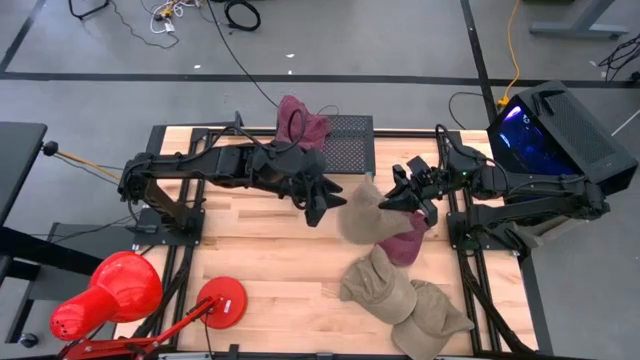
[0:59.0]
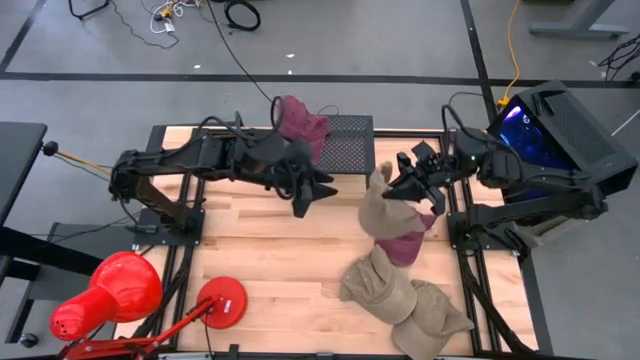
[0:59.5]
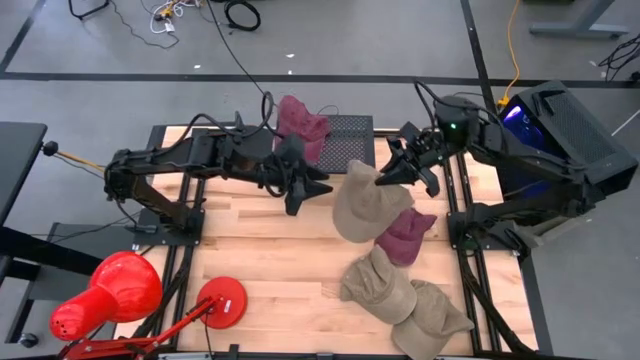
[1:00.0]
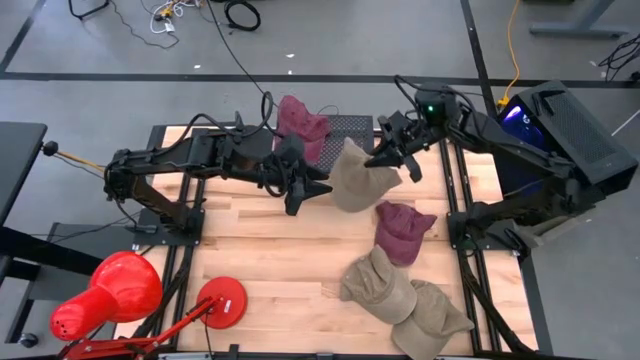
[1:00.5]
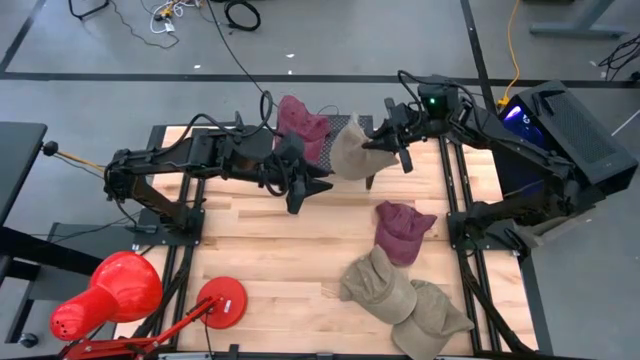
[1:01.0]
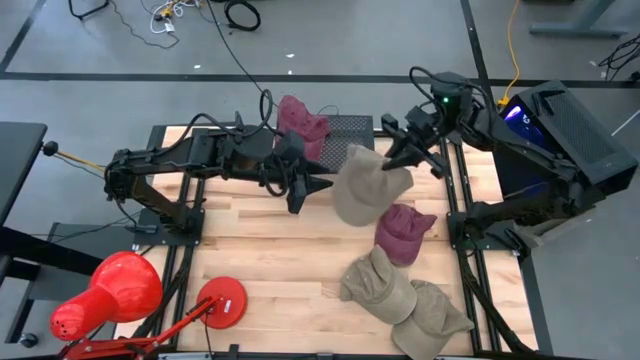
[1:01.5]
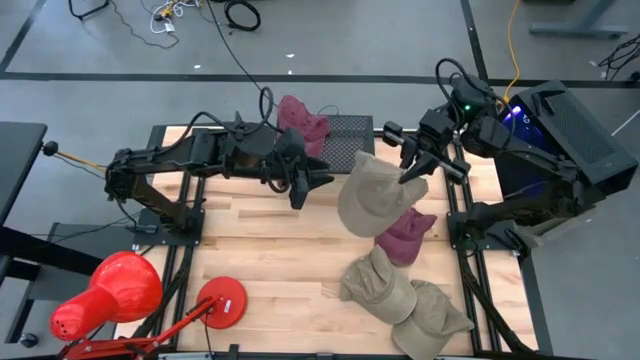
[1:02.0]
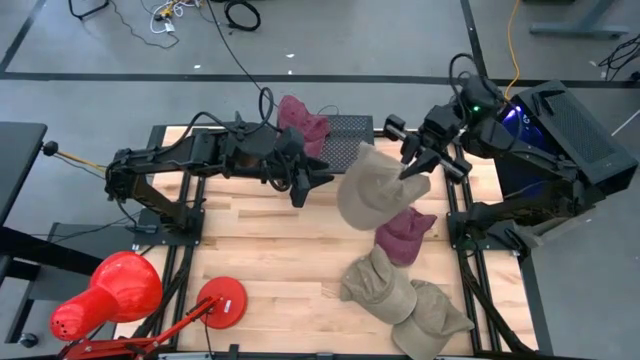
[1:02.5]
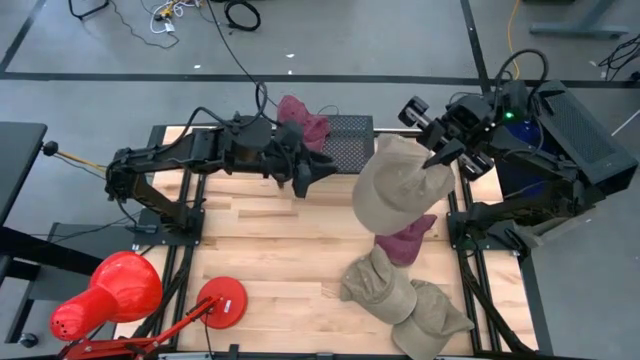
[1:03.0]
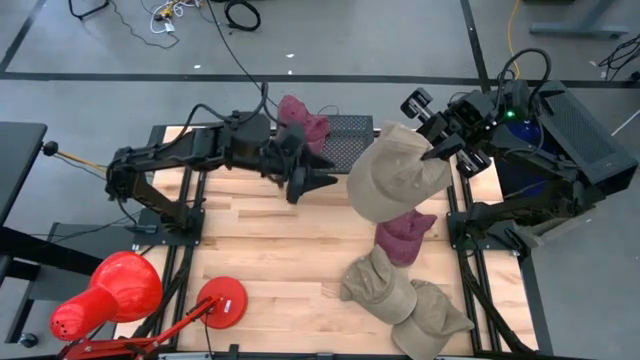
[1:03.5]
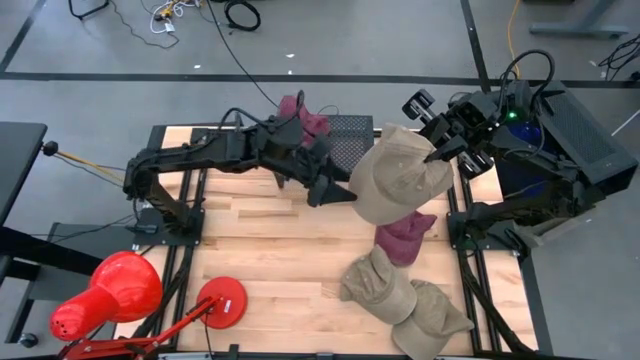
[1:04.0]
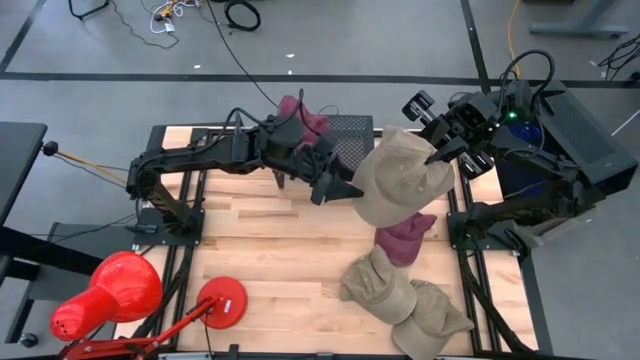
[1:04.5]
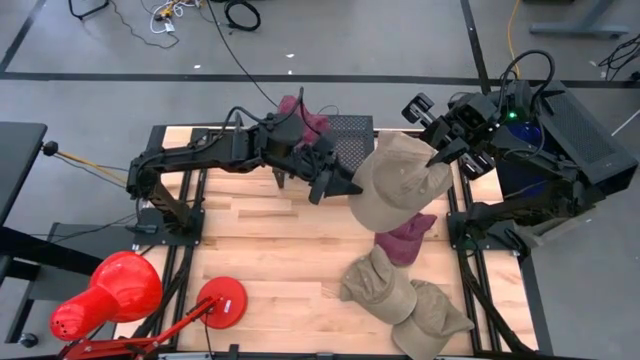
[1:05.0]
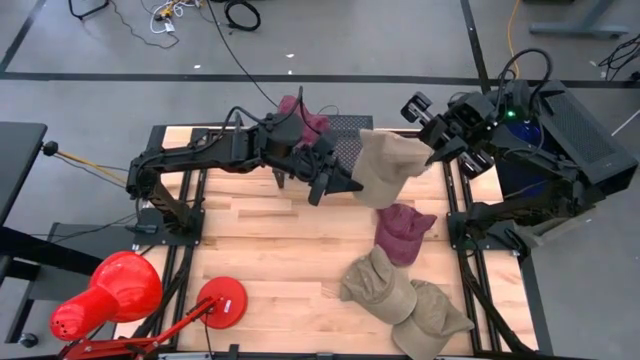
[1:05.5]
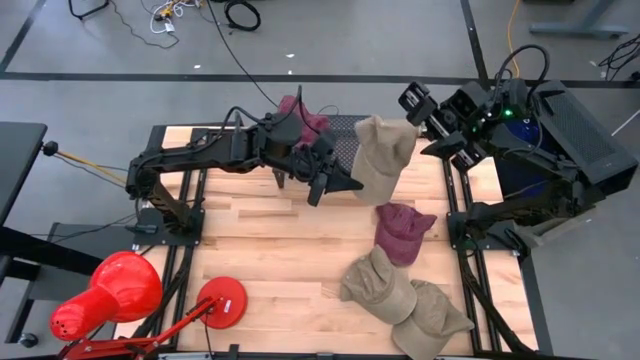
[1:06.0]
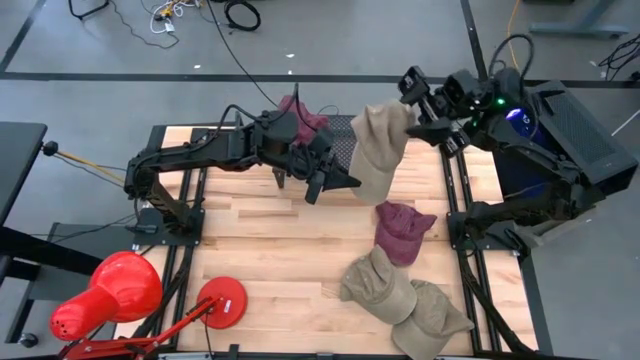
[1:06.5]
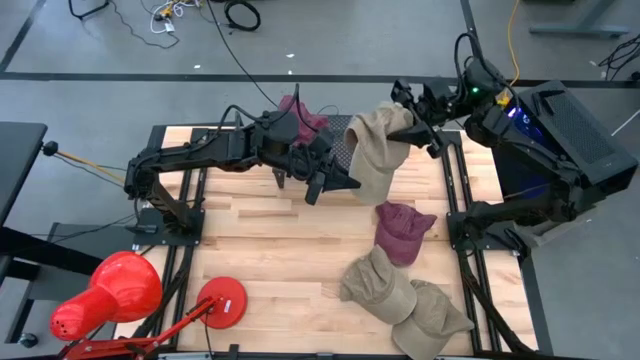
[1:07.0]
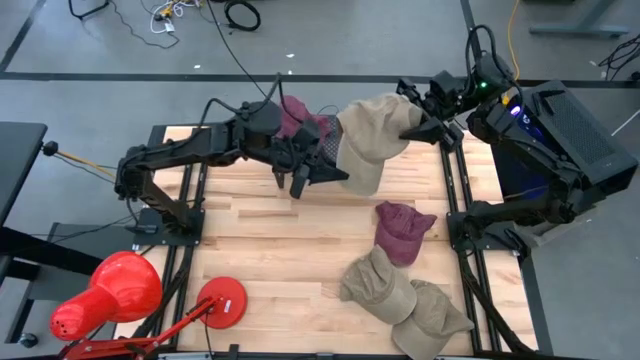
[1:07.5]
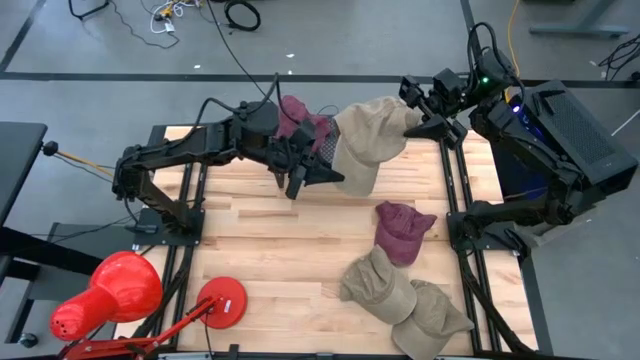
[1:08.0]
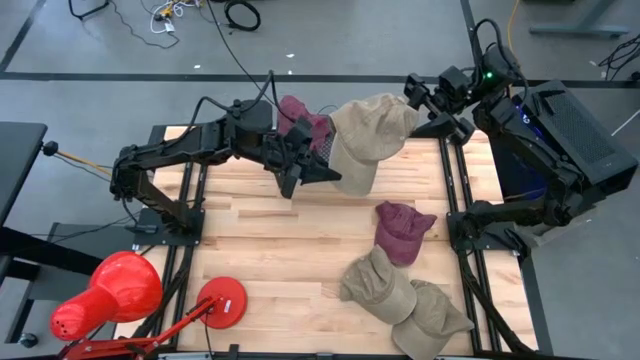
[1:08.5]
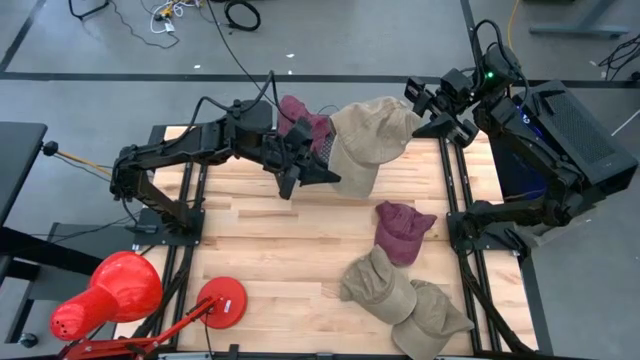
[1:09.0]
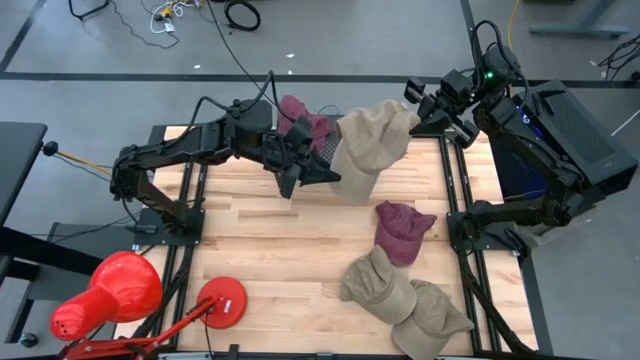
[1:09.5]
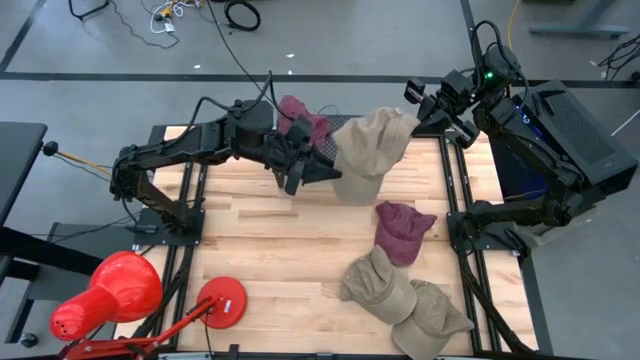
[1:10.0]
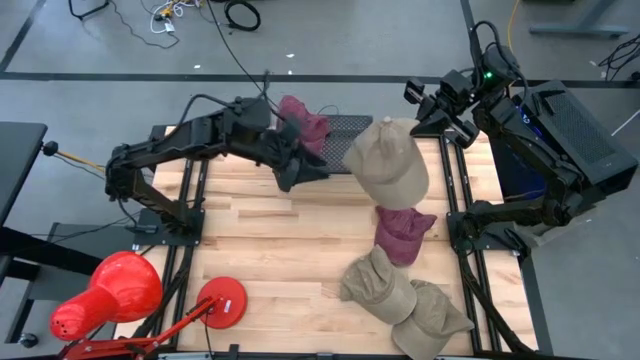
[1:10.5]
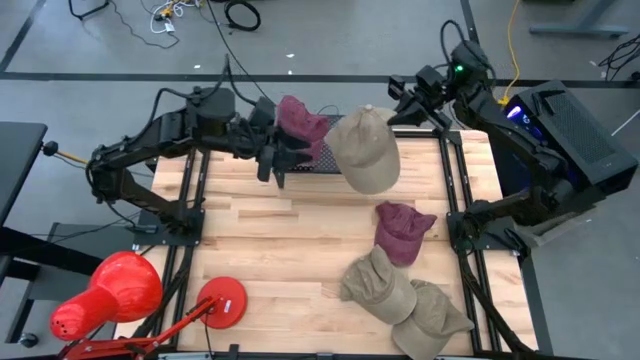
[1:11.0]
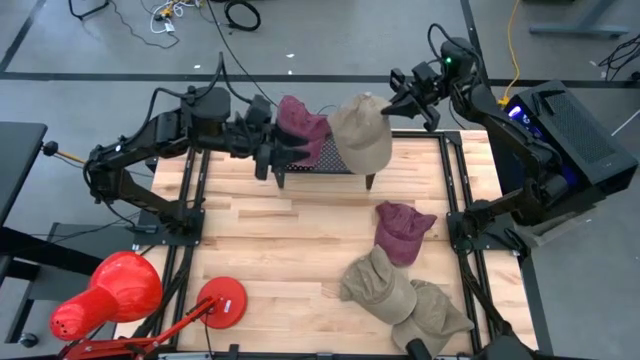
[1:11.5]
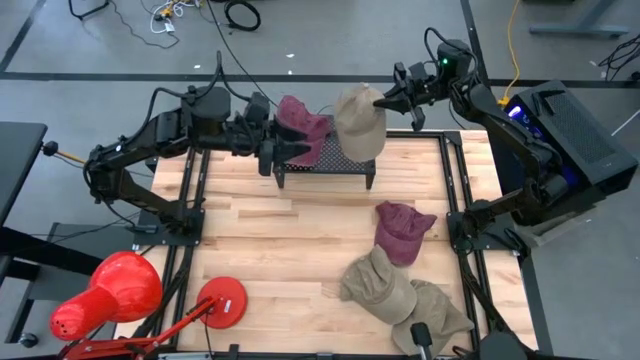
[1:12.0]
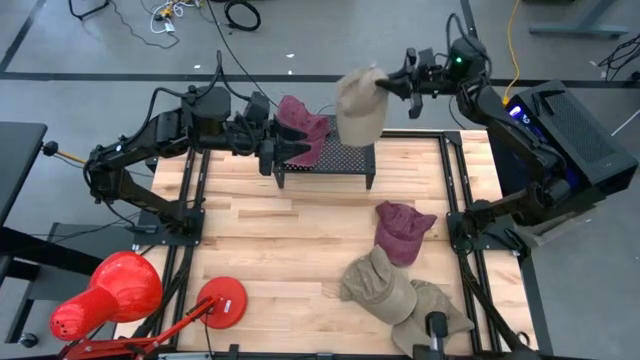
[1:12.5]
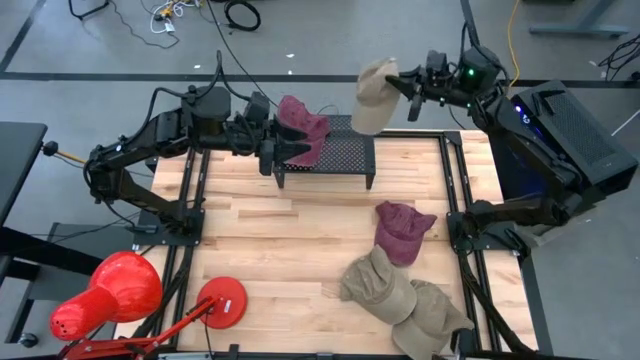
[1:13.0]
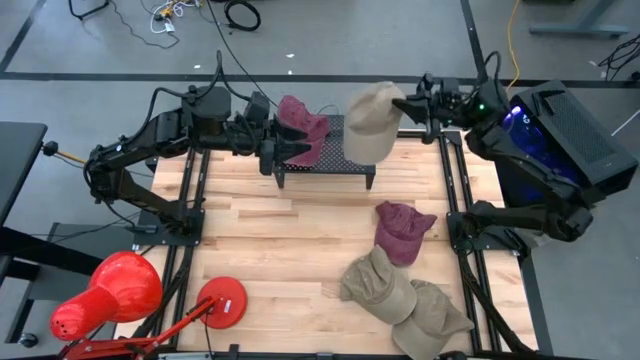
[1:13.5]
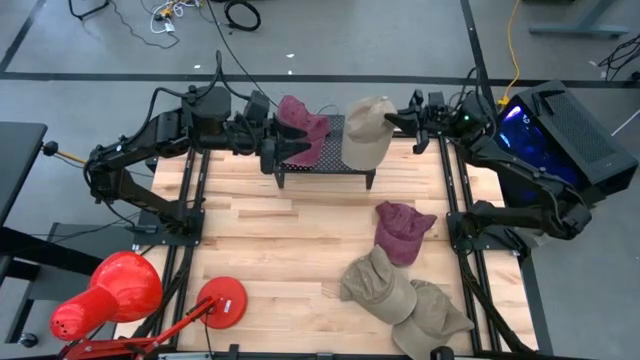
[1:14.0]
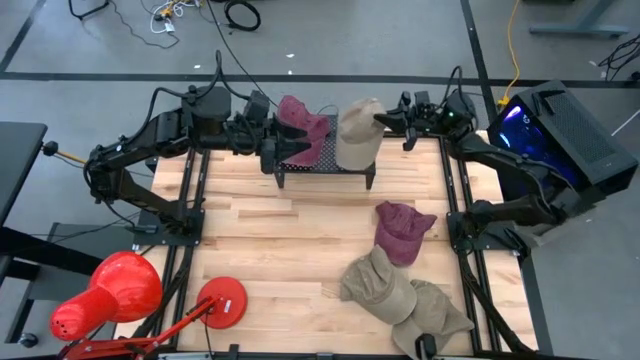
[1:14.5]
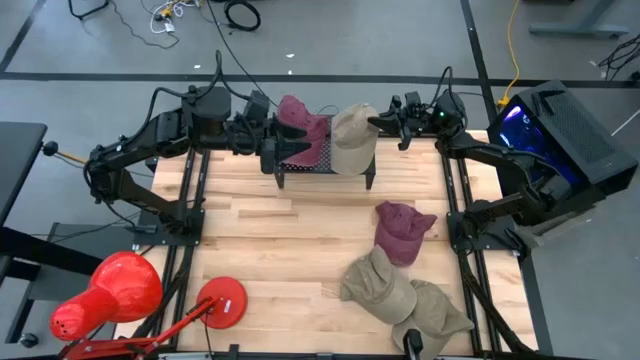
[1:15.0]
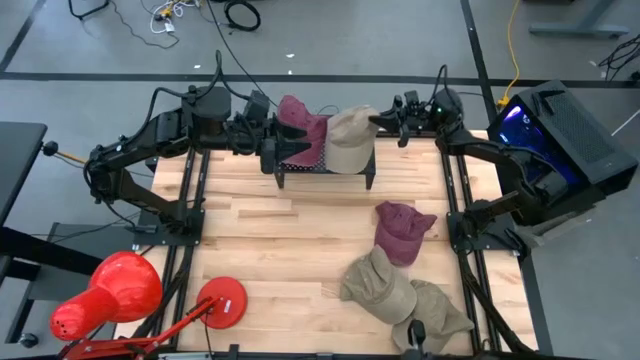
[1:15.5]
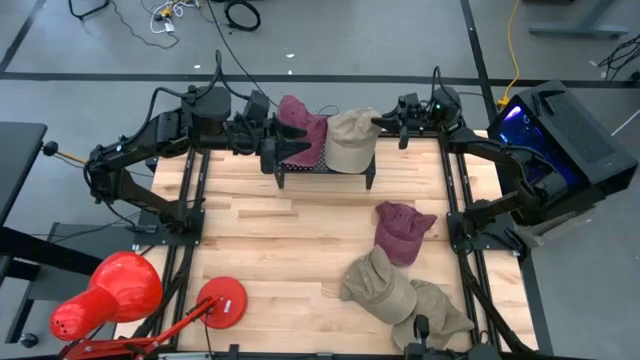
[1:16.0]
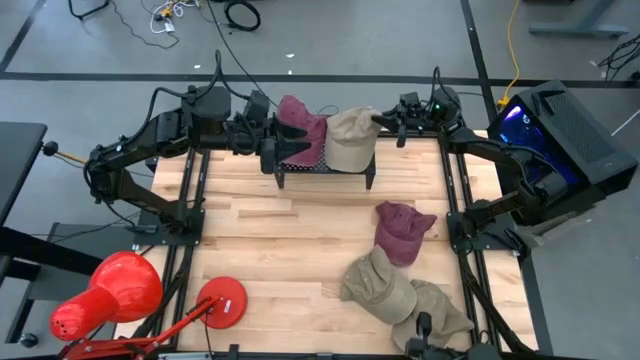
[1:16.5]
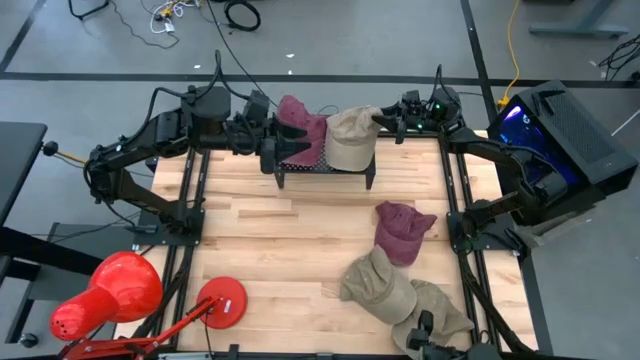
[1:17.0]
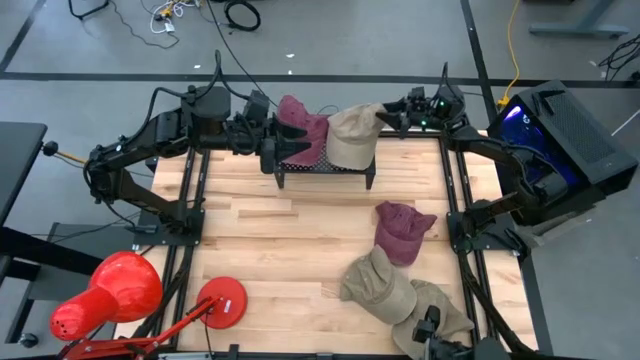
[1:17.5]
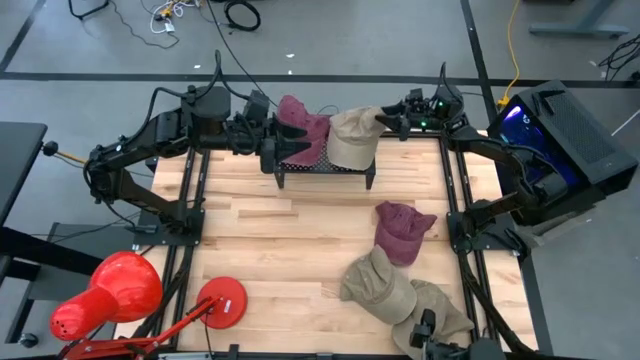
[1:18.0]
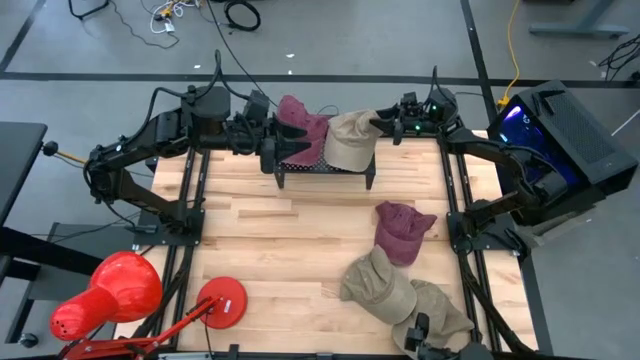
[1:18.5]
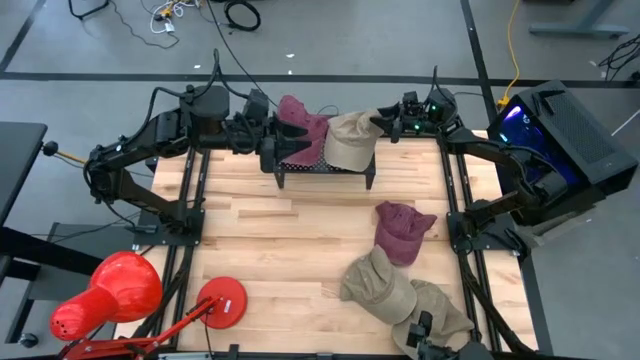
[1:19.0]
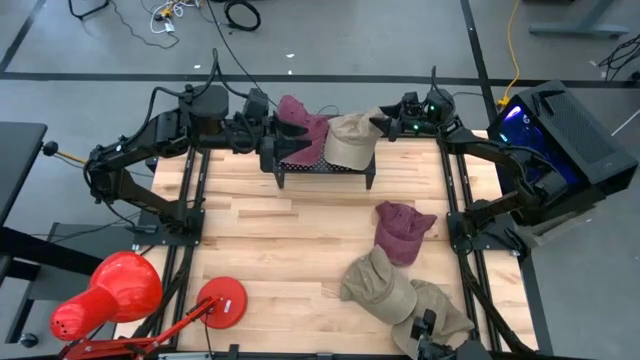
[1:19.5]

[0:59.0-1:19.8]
Task: Pick & Place hat
Put the top brown cap on the shelf
